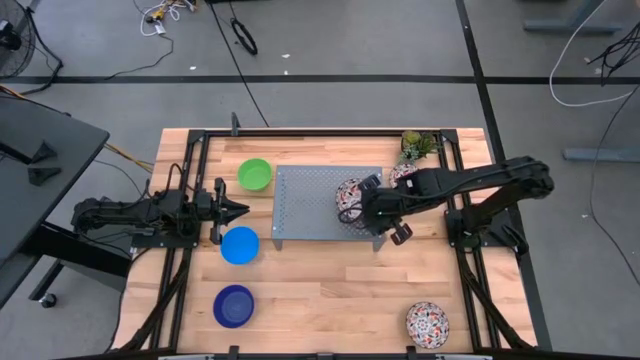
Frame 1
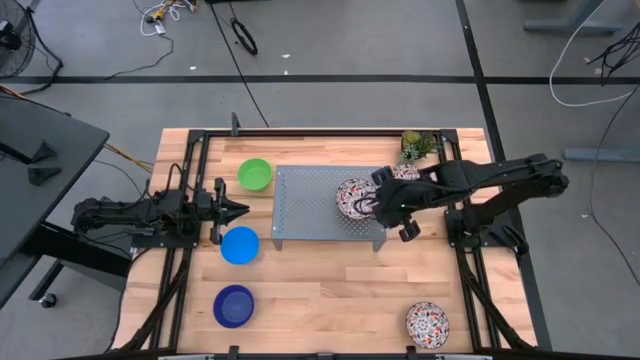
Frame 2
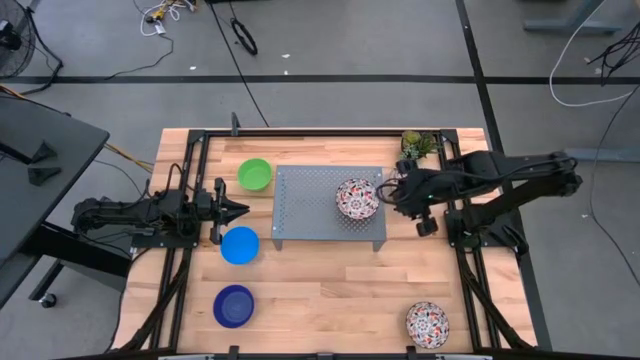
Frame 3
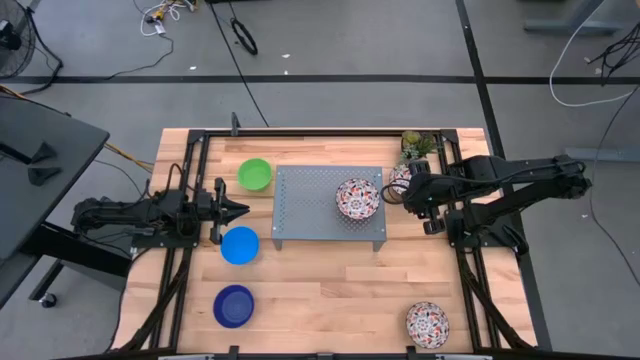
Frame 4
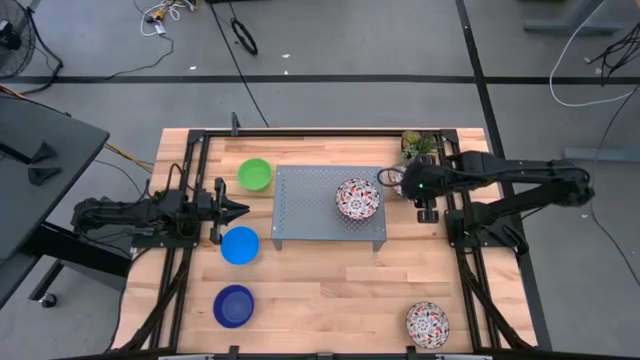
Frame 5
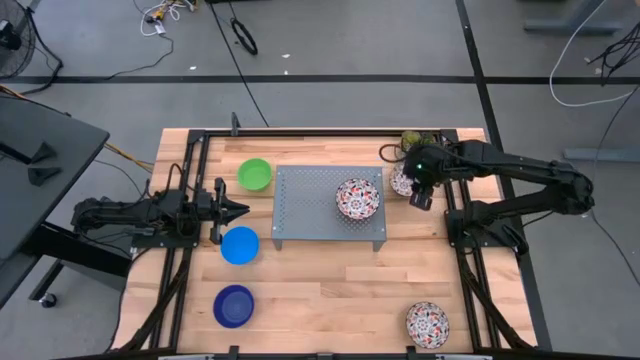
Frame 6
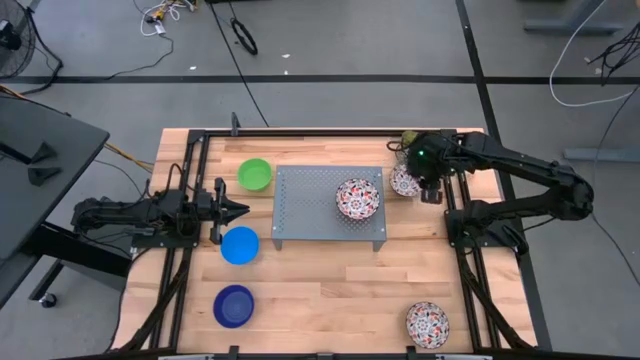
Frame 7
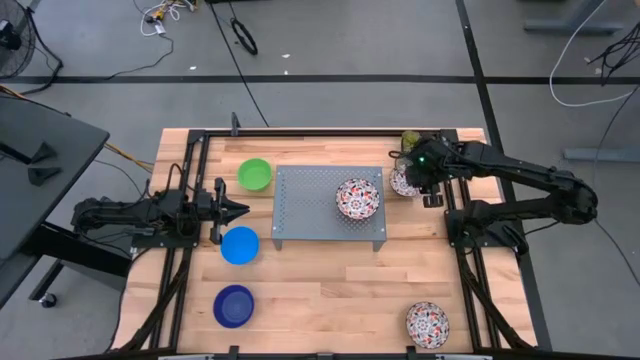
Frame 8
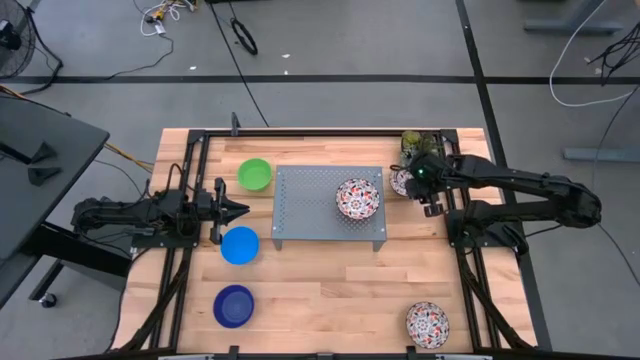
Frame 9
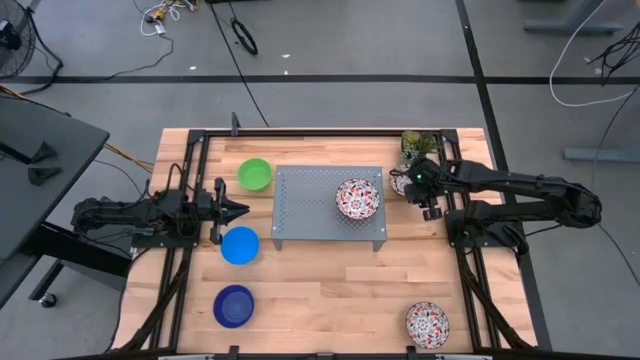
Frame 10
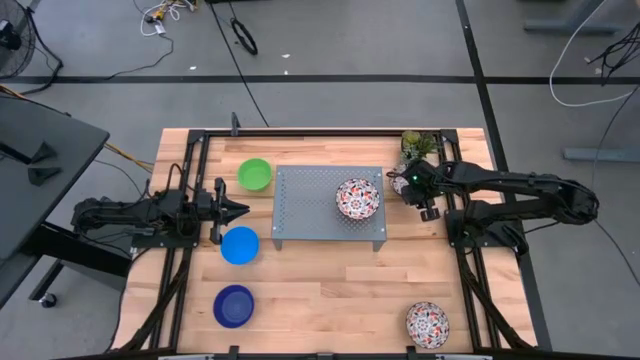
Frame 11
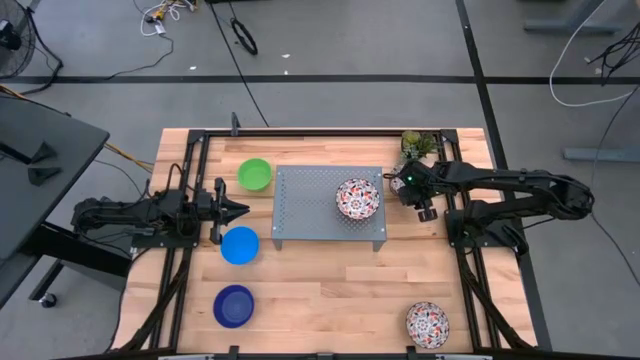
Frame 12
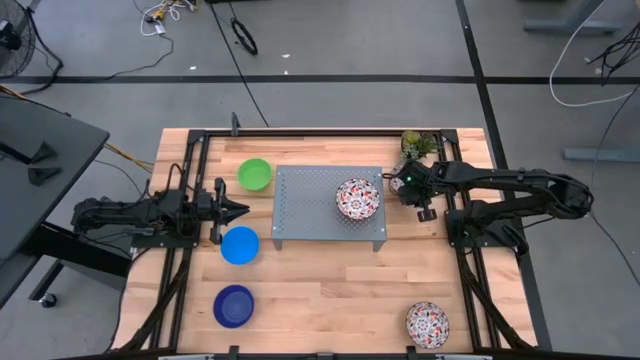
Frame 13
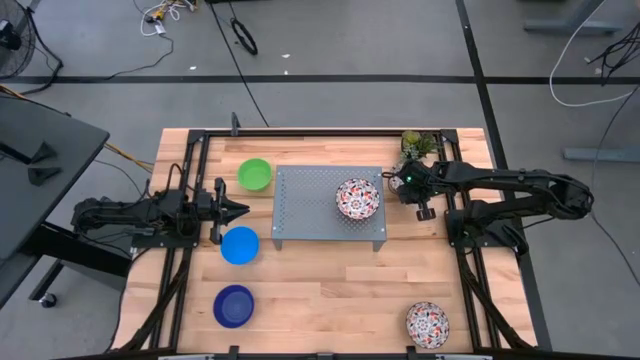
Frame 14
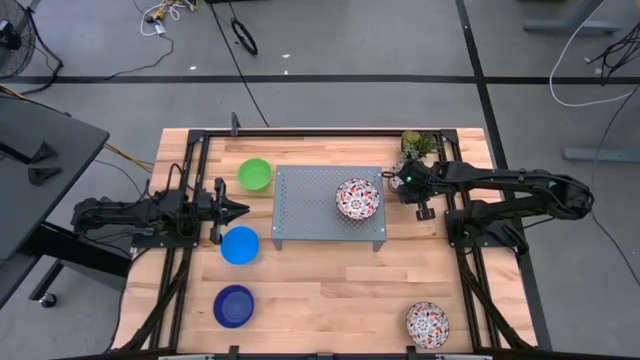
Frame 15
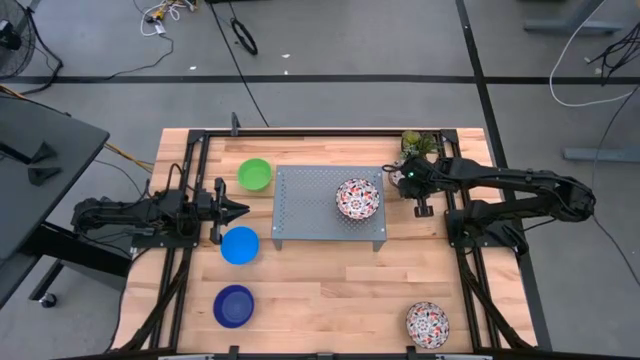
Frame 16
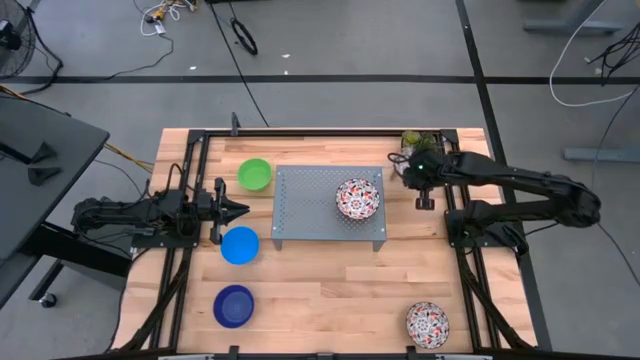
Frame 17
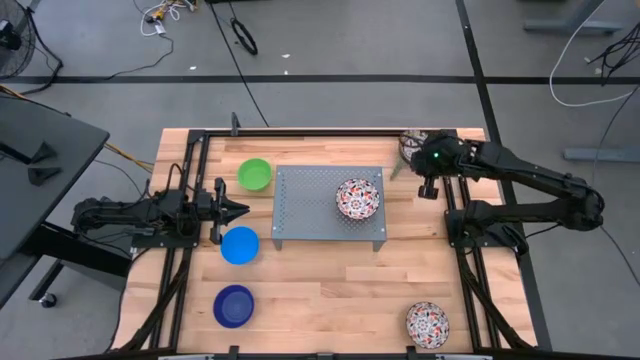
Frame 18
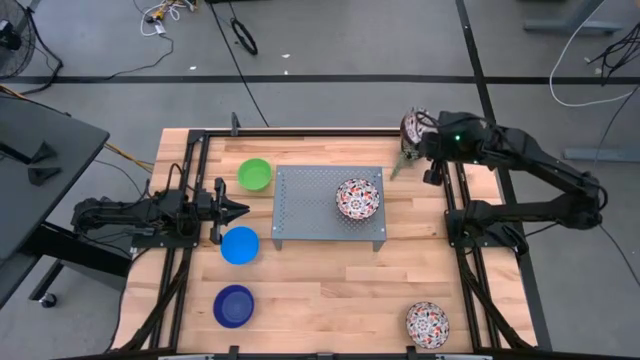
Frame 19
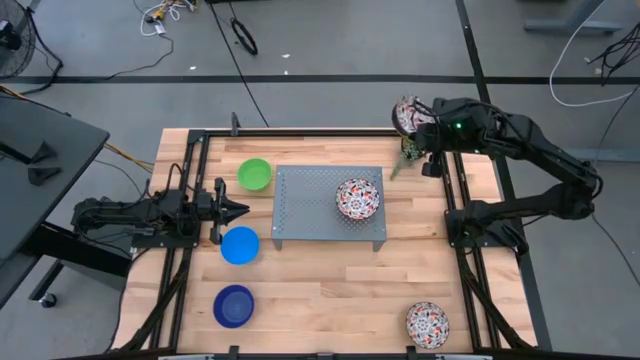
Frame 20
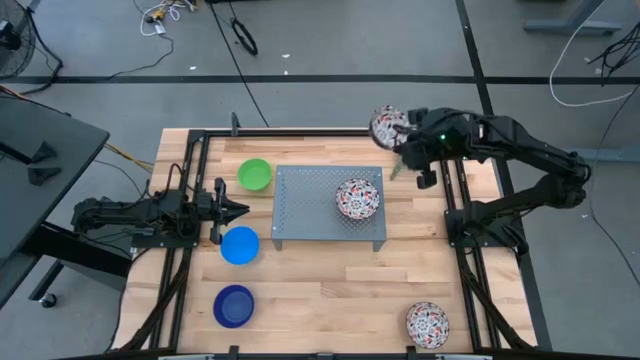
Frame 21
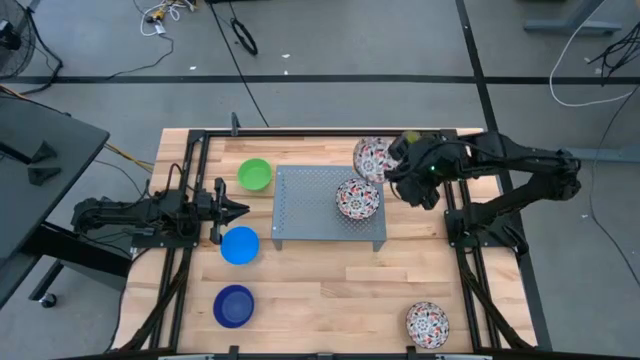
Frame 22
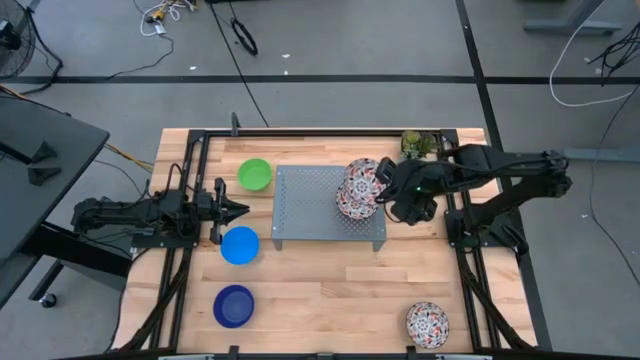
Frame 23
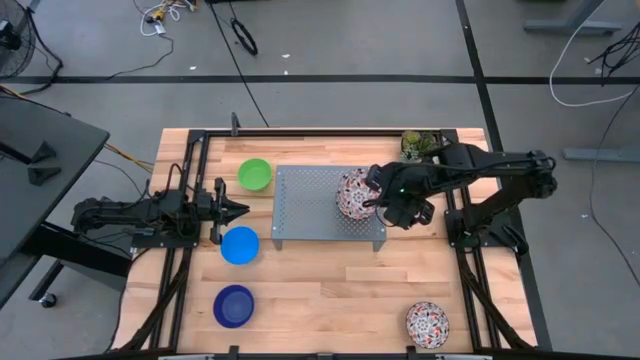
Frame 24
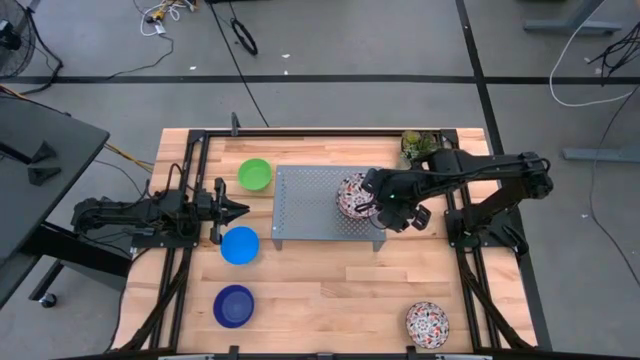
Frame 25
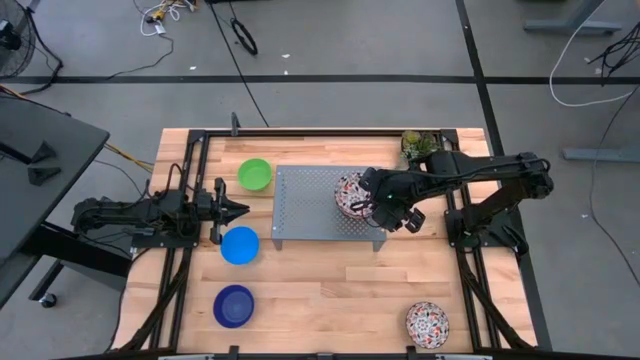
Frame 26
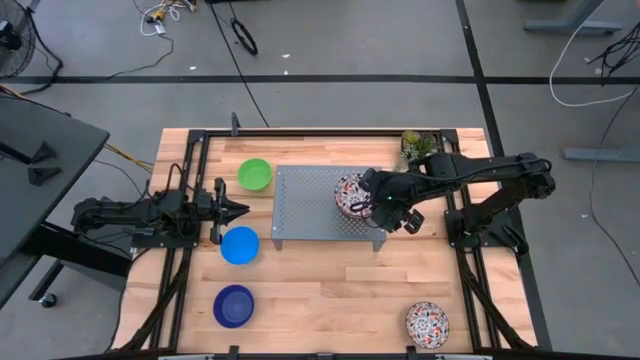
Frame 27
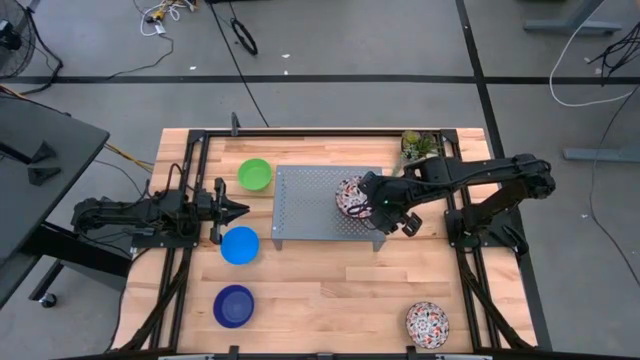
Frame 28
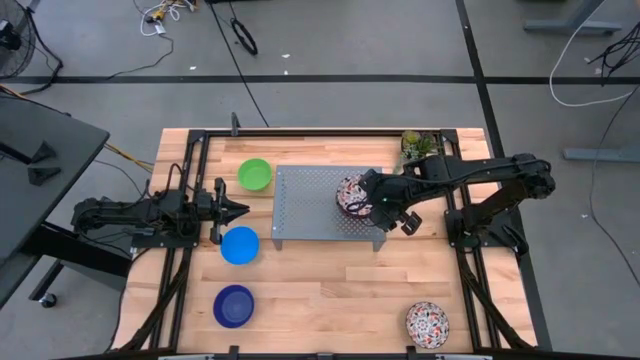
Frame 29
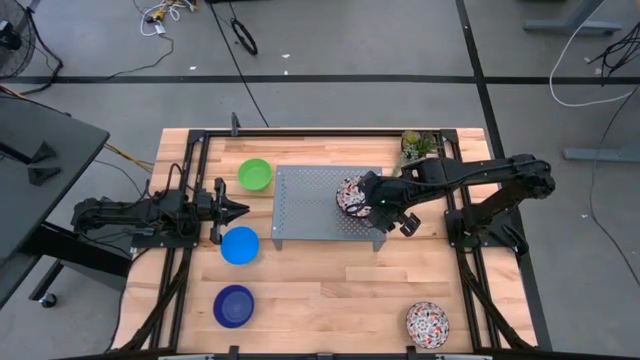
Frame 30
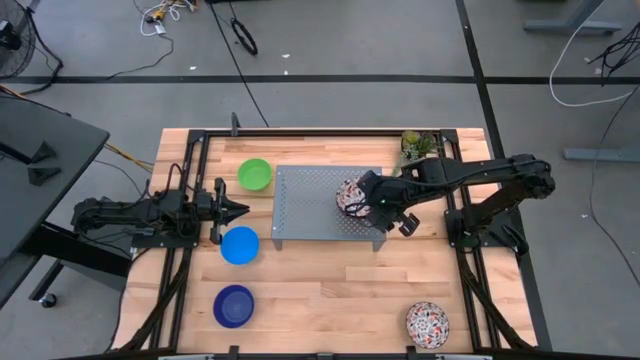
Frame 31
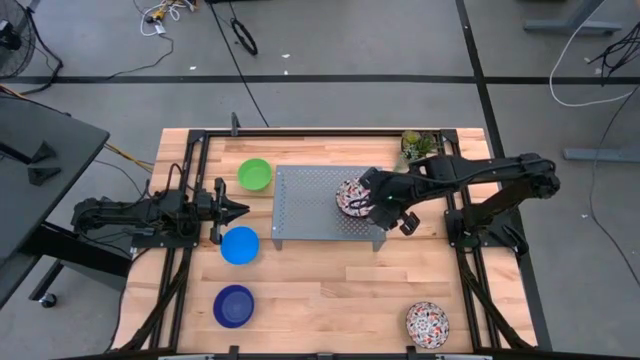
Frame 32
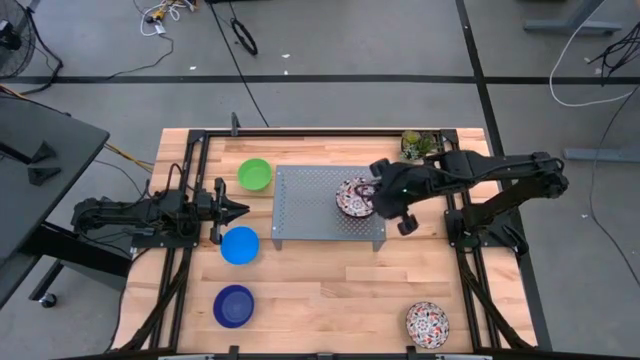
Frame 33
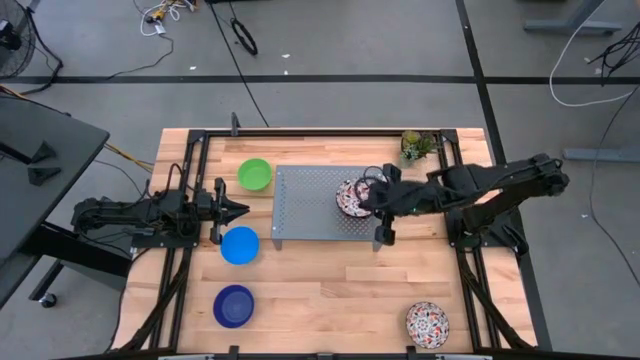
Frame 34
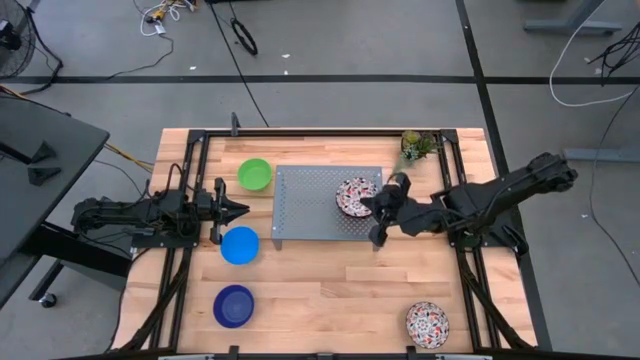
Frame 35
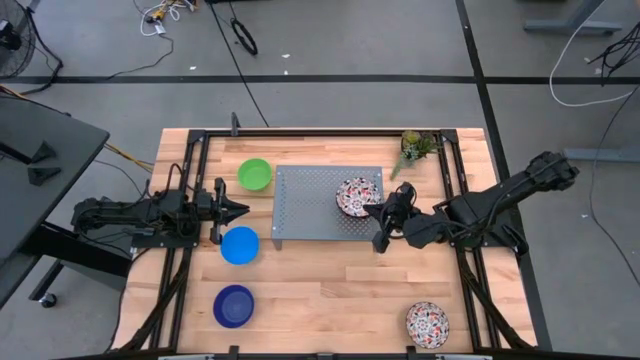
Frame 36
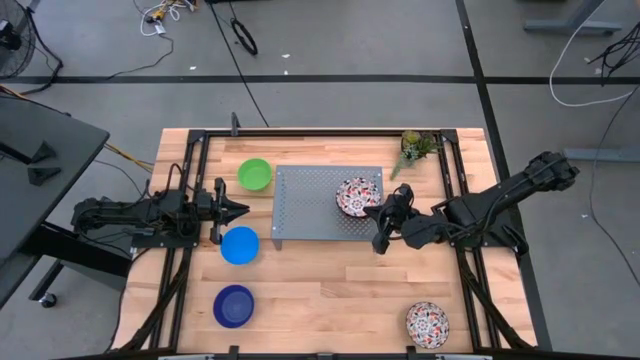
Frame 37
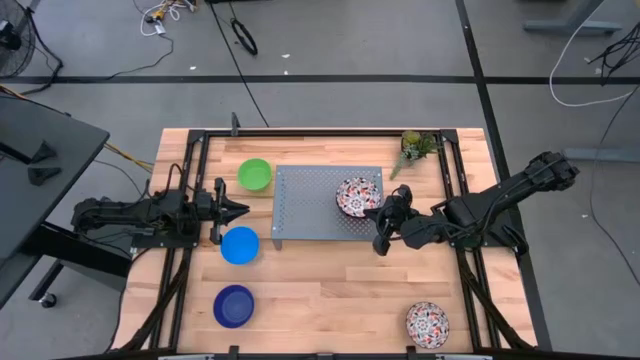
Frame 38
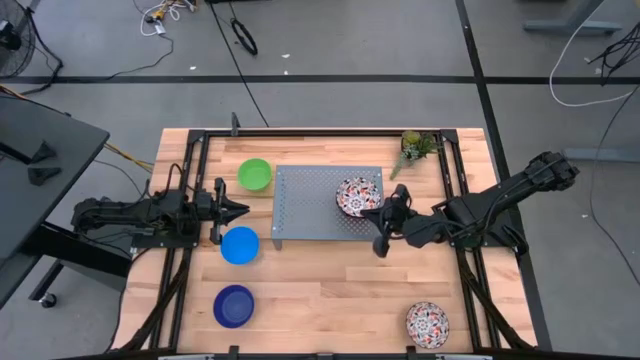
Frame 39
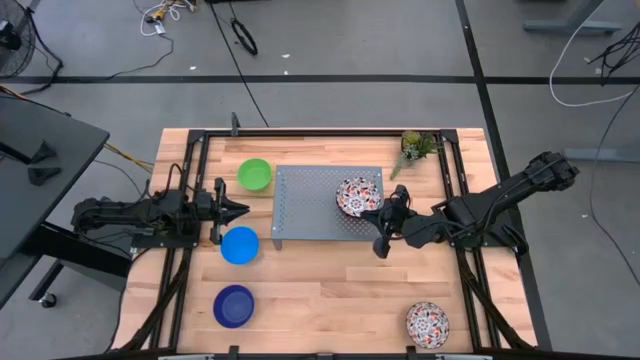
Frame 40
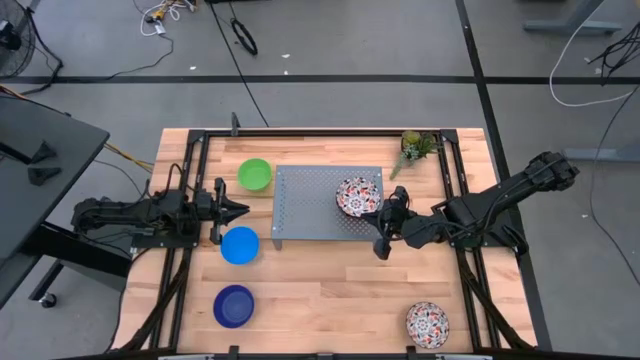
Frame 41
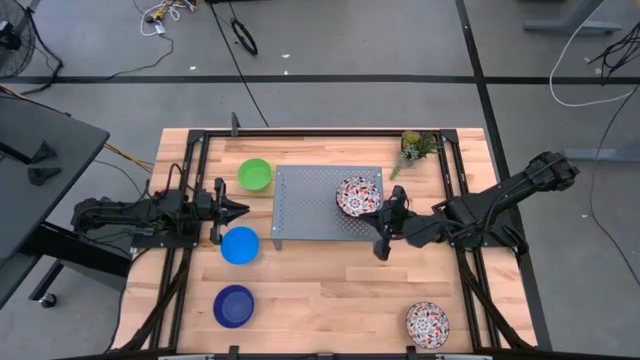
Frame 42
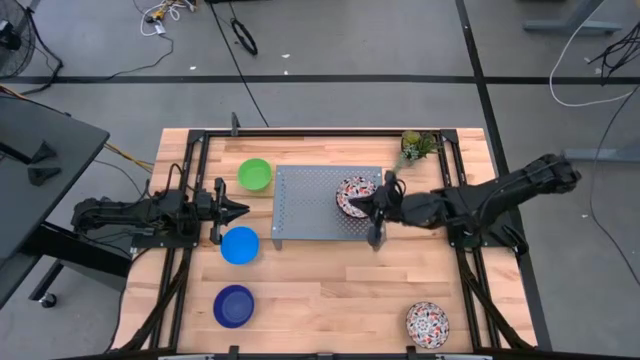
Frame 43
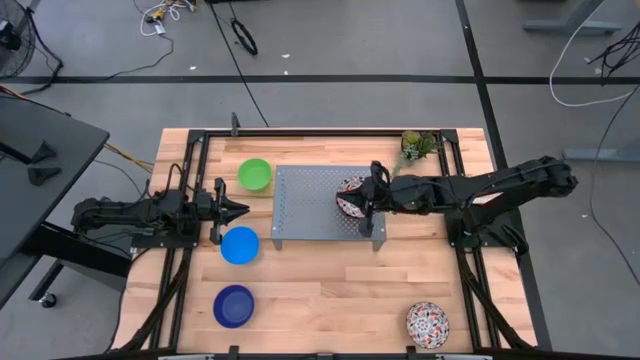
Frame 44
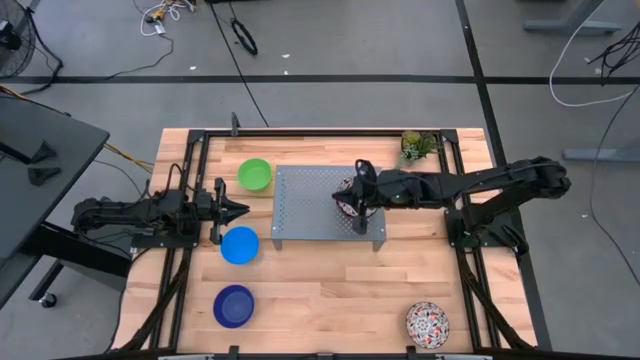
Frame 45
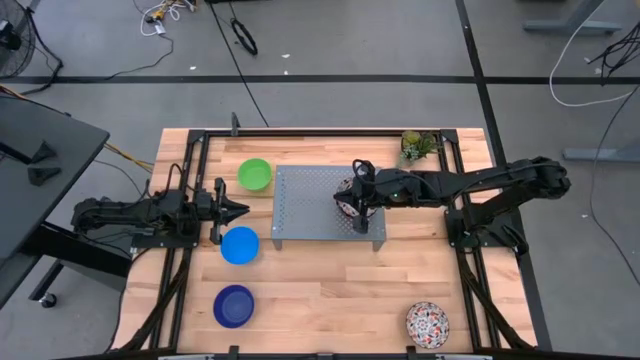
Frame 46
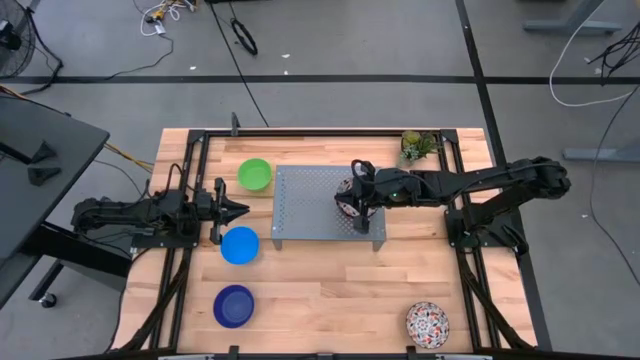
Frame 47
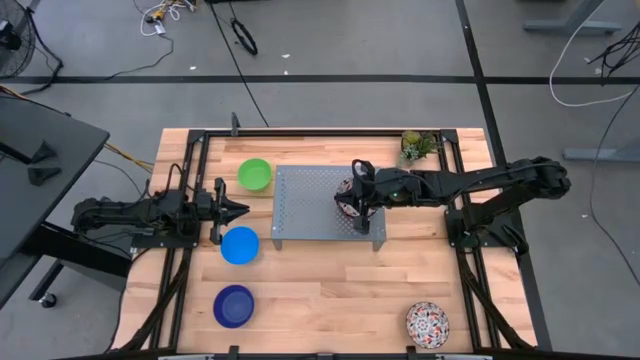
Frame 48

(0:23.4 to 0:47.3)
Task: Pick & Place Mini bowls
Stack the top white patterned bowl on top of the other white patterned bowl on the shelf
